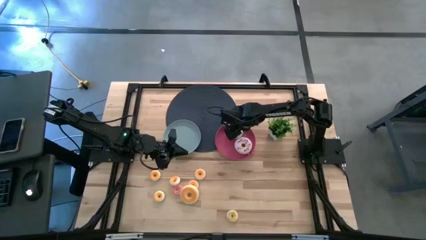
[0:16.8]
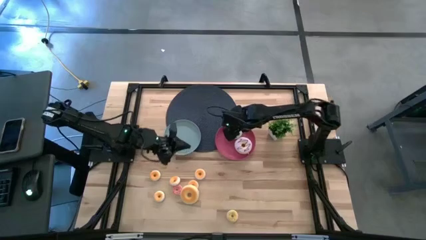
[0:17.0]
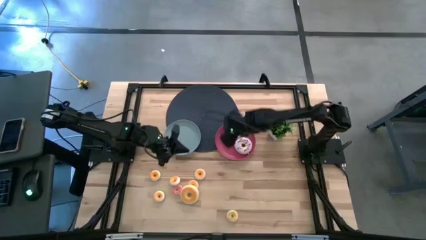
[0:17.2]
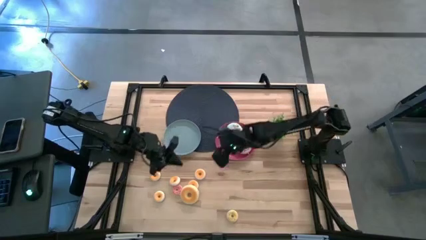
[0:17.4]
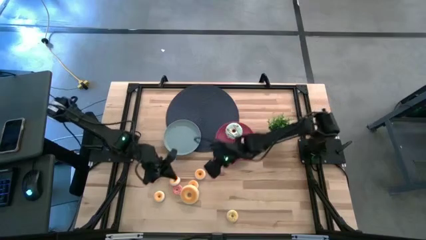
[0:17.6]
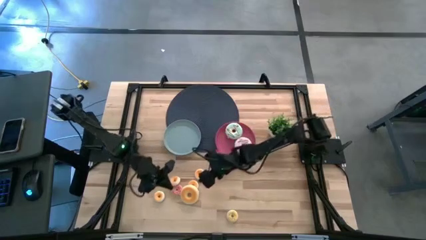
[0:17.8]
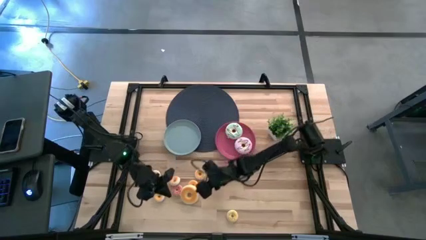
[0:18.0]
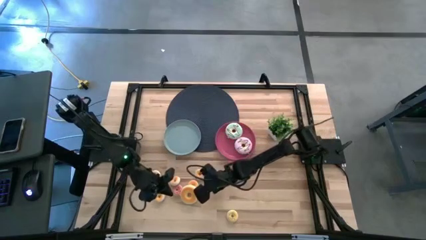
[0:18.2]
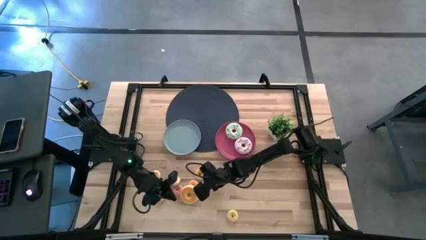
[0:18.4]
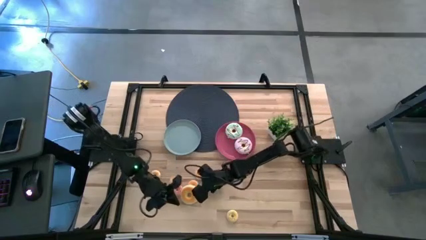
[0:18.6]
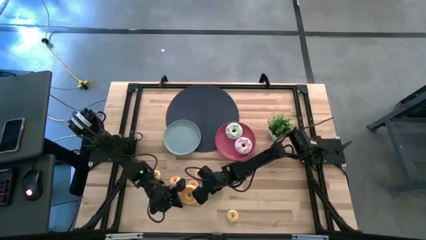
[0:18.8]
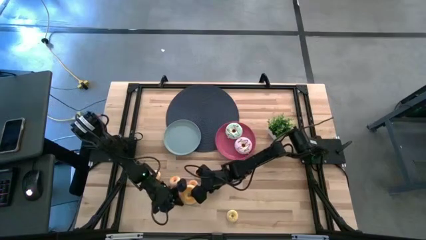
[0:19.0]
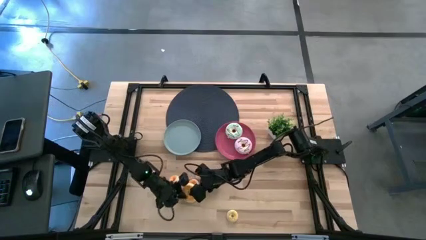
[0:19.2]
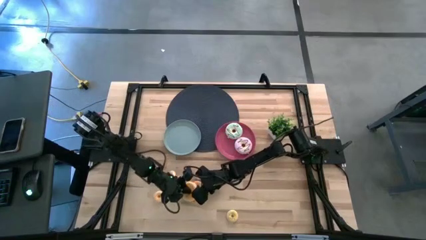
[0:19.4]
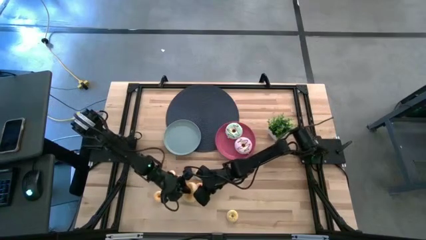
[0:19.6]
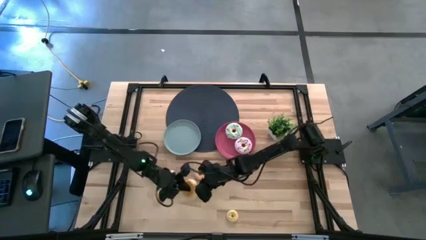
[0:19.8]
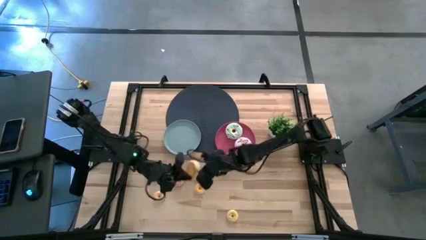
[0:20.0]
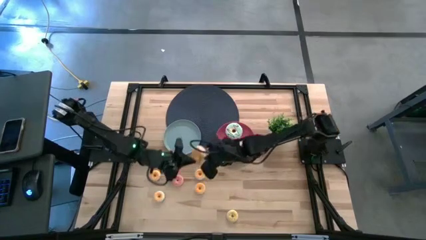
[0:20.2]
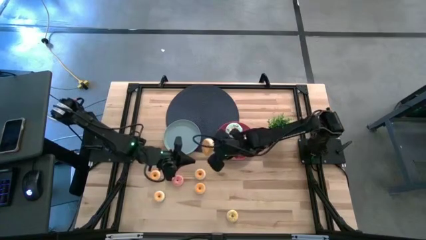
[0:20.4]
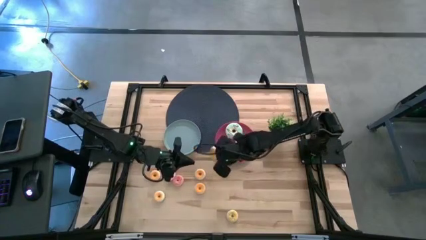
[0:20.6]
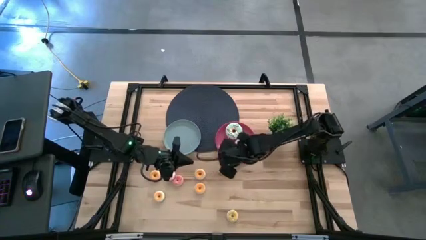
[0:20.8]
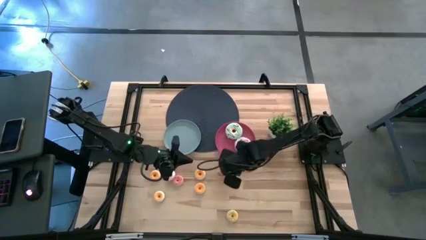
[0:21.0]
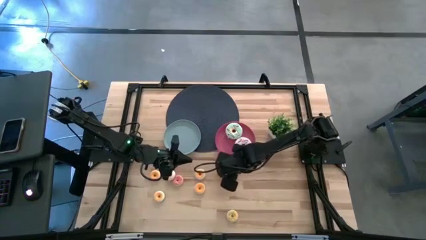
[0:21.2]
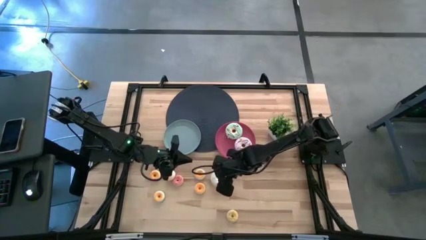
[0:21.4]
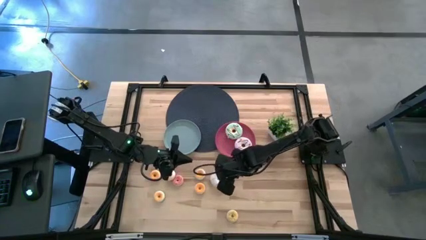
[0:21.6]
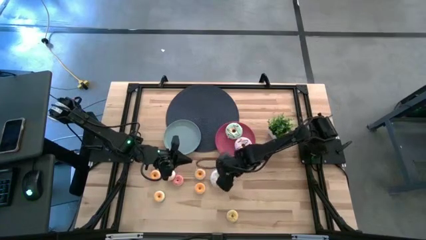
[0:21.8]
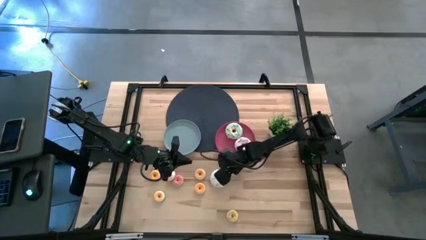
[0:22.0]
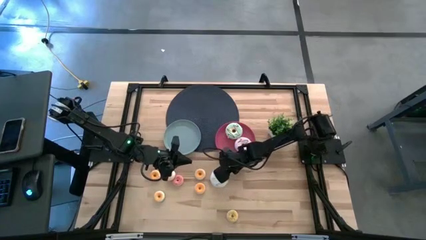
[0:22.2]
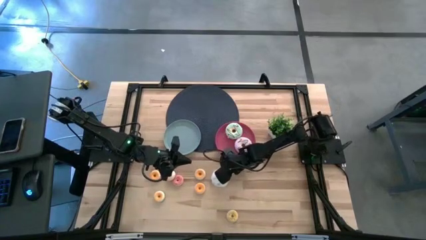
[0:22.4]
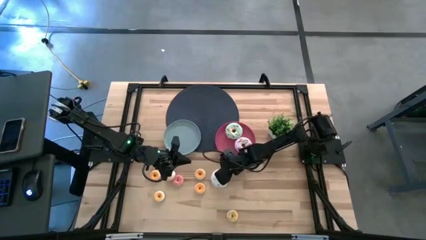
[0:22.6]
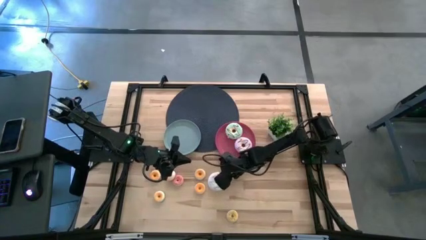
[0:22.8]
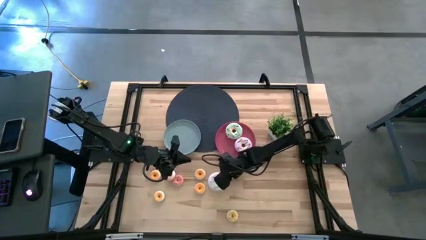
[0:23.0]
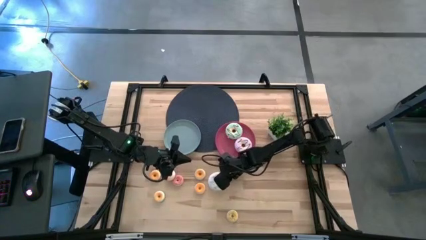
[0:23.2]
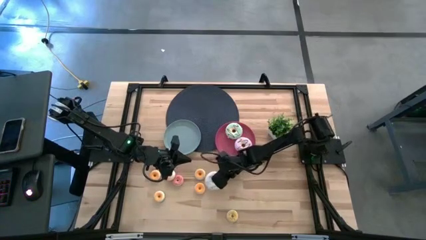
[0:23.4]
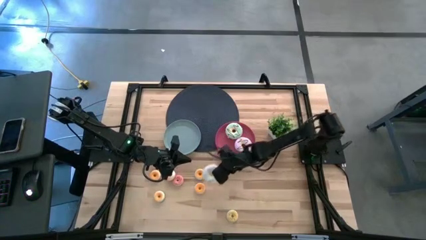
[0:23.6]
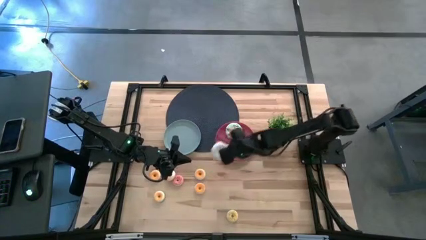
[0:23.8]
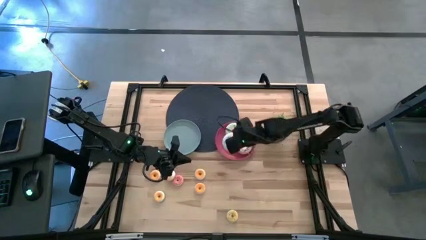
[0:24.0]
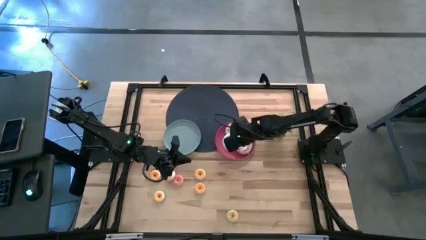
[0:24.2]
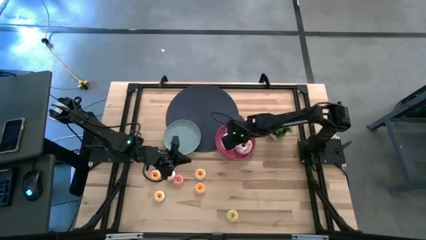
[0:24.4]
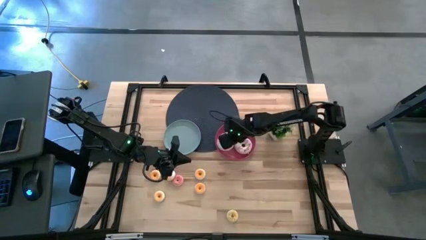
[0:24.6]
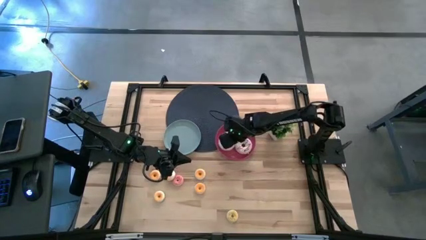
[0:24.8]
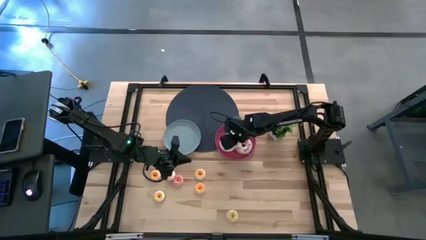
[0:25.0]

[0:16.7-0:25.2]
Task: Pick & Place donuts
Put the large white doughnut on the pink plate

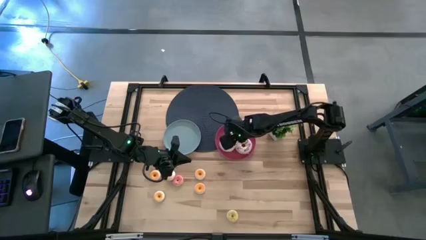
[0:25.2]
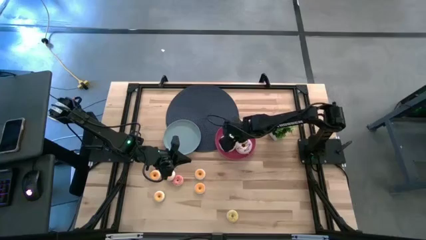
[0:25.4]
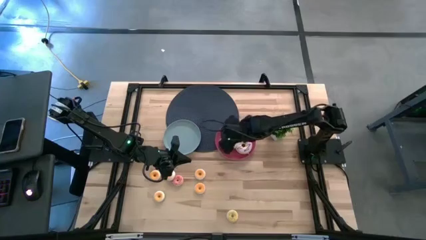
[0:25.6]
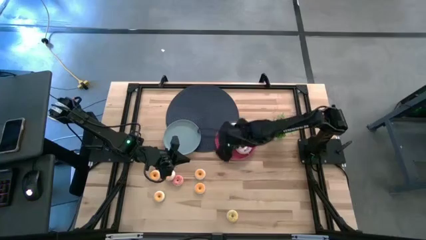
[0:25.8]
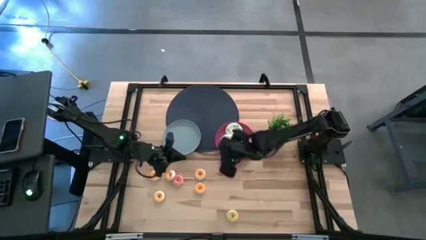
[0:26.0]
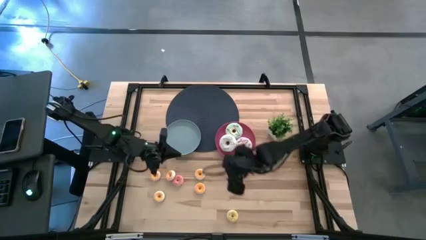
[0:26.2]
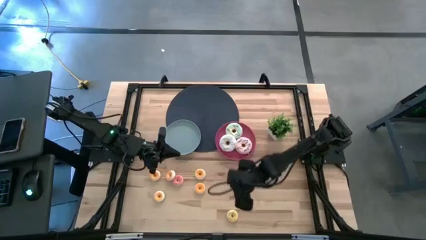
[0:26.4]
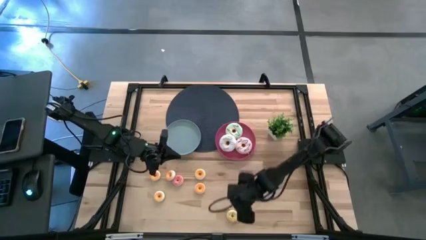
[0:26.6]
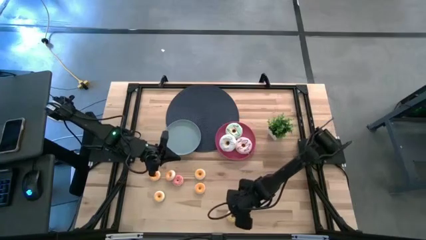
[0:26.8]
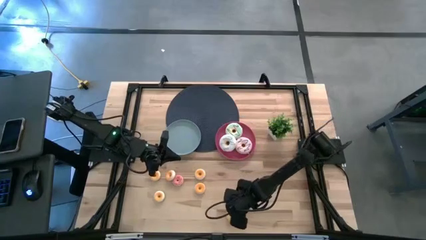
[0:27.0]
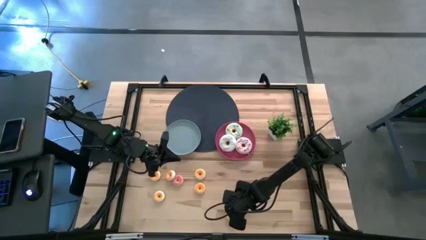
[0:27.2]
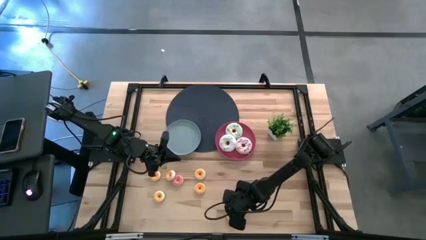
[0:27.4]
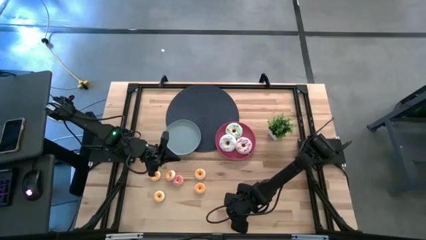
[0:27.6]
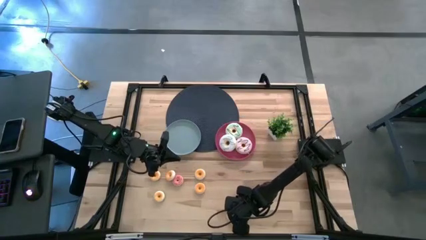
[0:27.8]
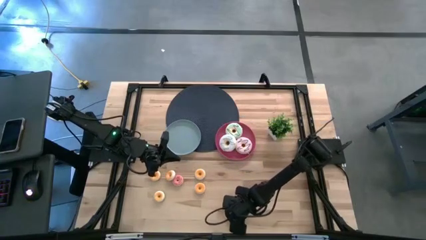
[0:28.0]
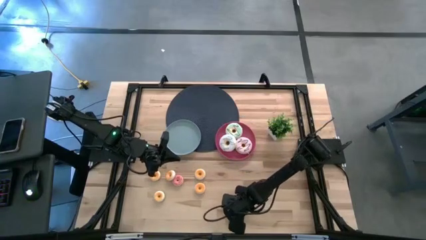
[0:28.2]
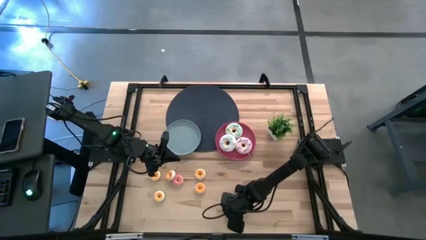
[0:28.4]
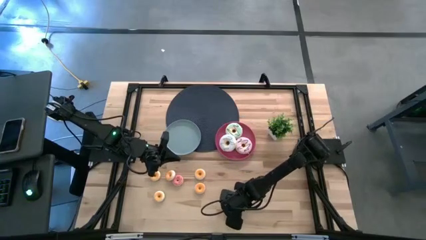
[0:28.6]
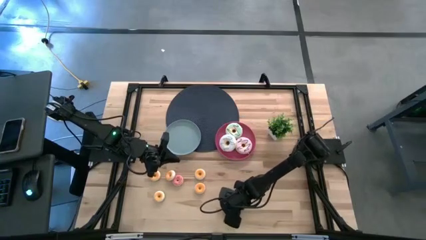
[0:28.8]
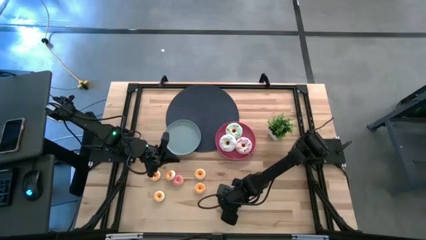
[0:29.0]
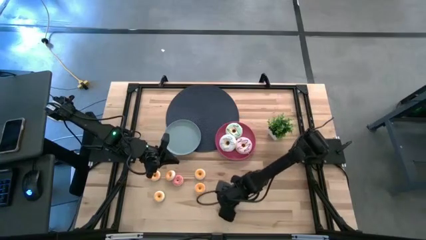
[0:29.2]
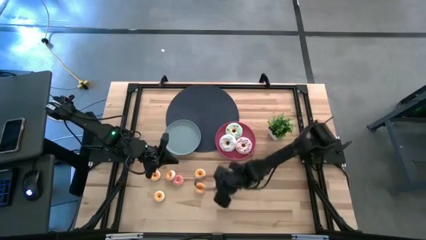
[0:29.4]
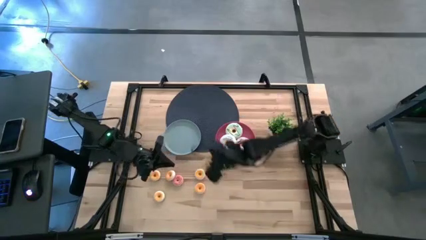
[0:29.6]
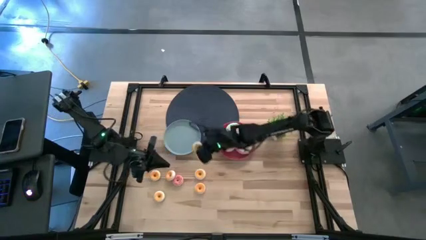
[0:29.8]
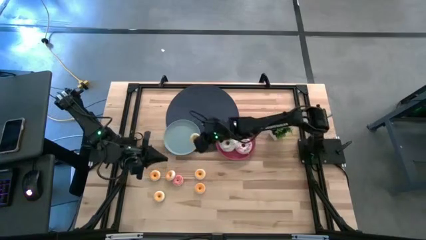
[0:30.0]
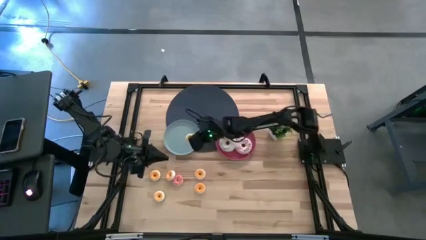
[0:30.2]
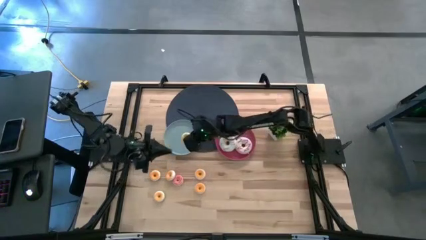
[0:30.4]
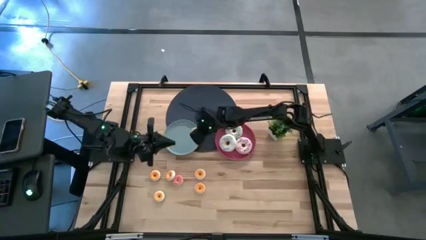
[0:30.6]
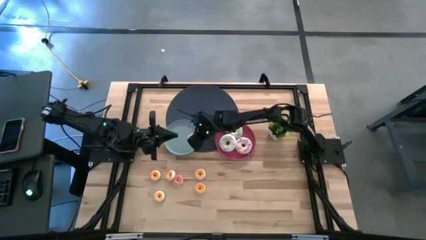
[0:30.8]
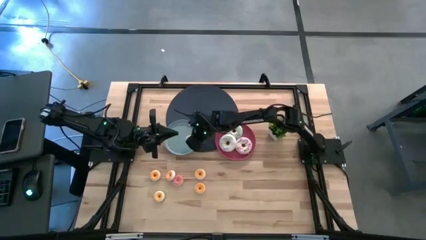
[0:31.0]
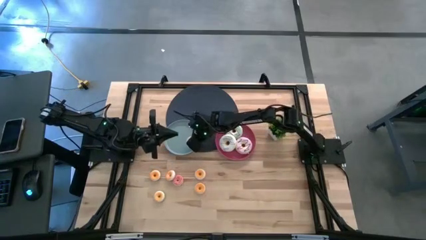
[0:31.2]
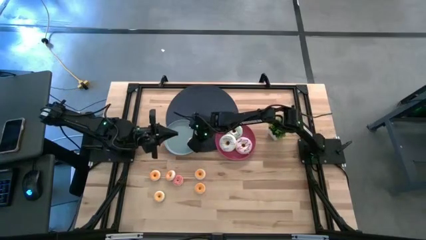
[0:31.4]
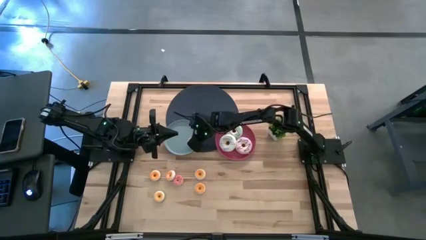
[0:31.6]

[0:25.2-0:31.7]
Put the small yellow doughnut on the blue plate

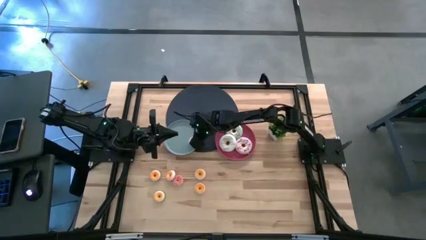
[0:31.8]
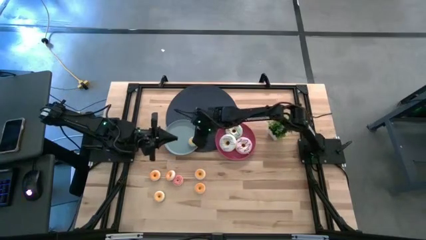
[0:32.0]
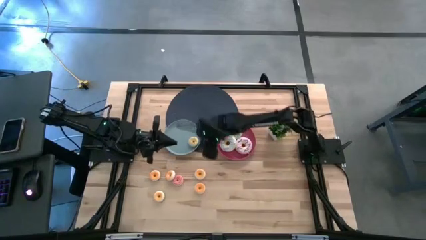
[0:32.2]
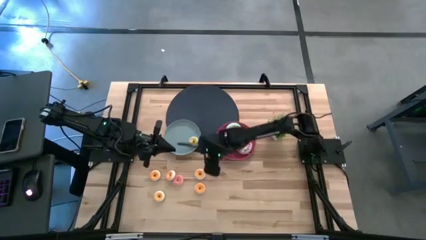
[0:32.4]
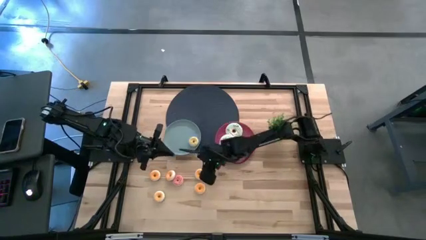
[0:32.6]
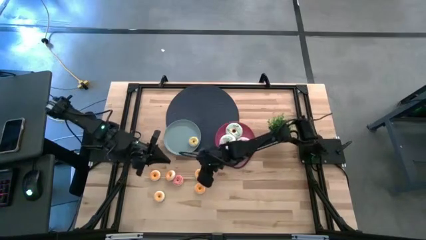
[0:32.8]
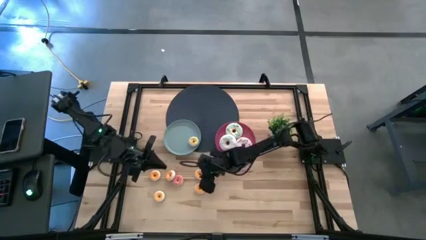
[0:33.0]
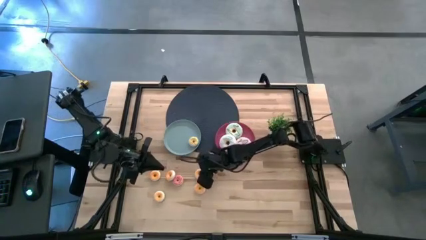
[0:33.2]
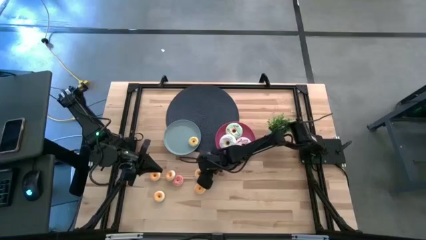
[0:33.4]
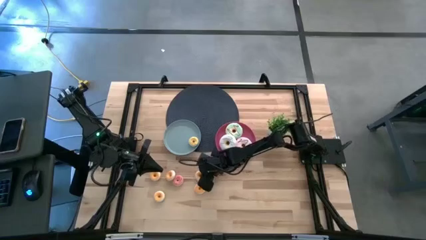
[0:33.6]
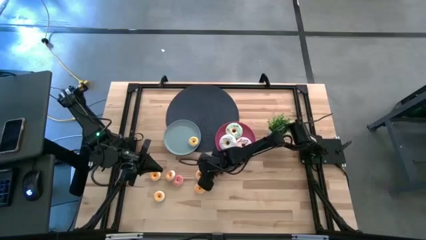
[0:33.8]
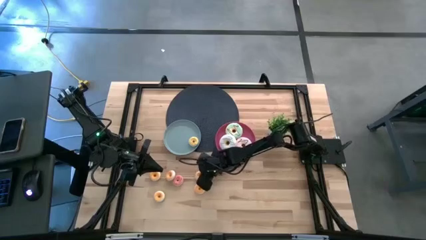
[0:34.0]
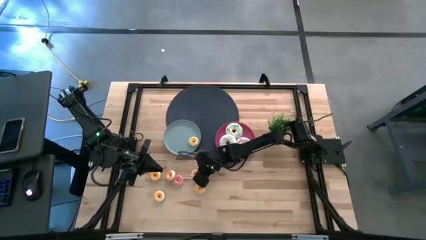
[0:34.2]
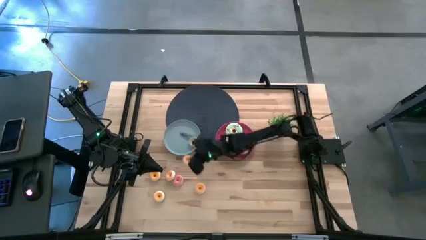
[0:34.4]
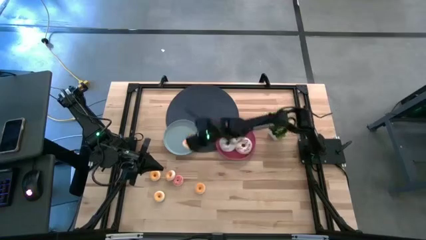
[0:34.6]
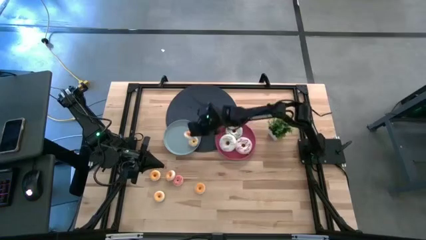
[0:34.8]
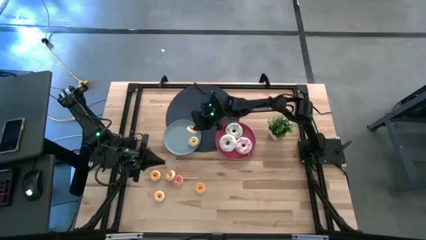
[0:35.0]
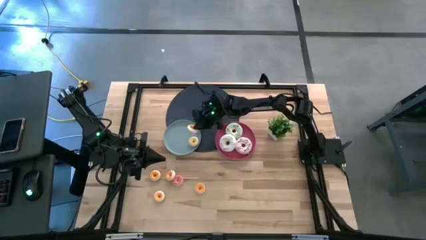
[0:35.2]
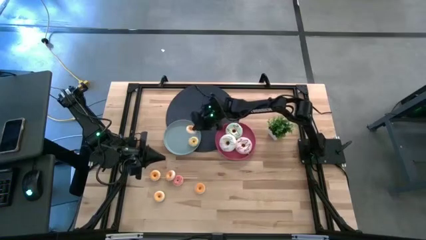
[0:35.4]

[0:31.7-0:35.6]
Put the right small green doughnut on the blue plate
